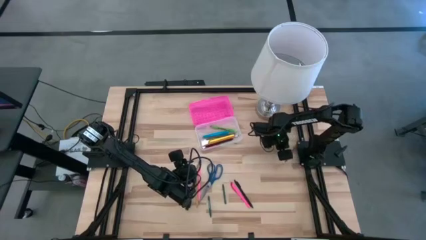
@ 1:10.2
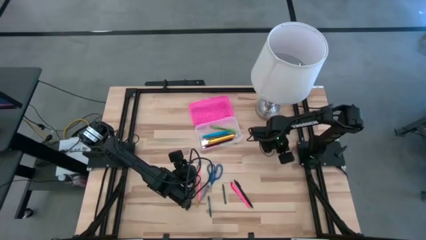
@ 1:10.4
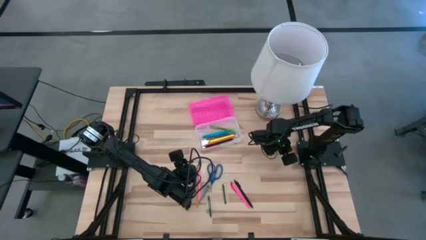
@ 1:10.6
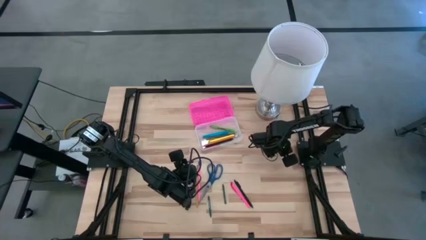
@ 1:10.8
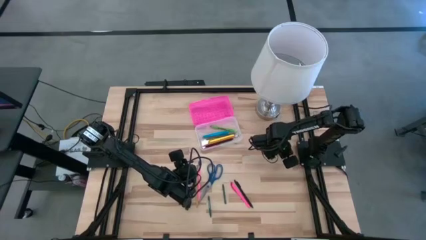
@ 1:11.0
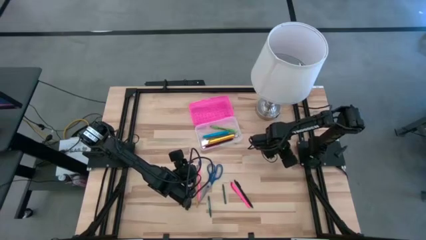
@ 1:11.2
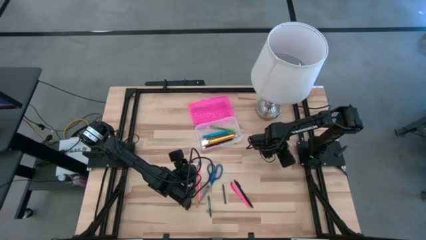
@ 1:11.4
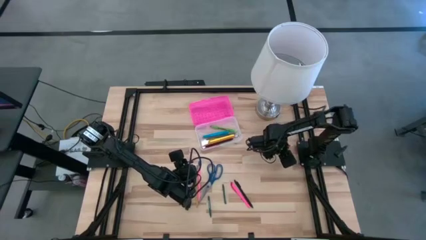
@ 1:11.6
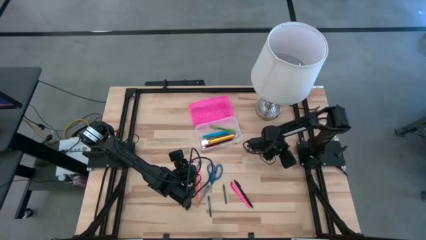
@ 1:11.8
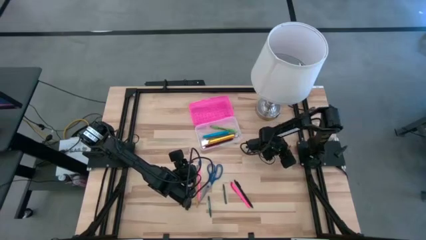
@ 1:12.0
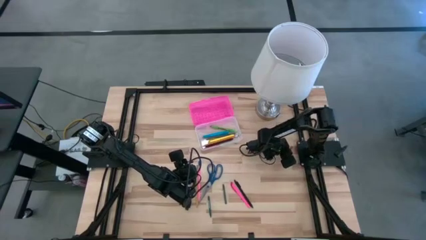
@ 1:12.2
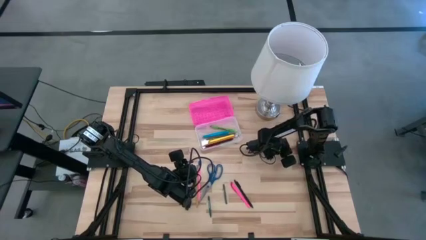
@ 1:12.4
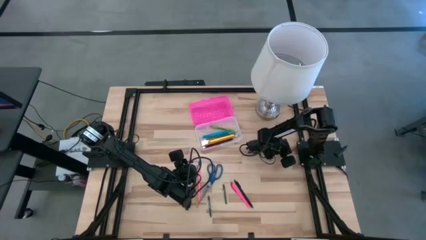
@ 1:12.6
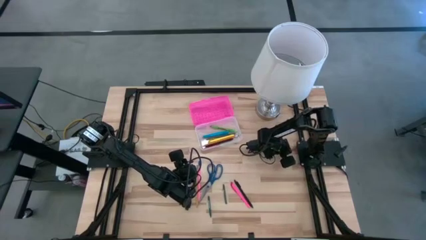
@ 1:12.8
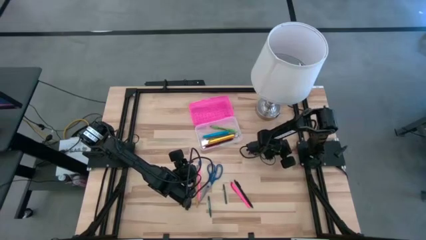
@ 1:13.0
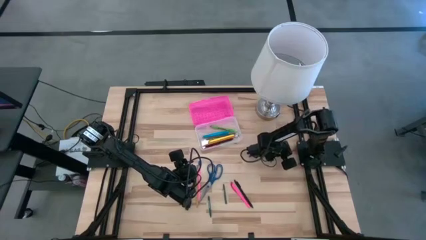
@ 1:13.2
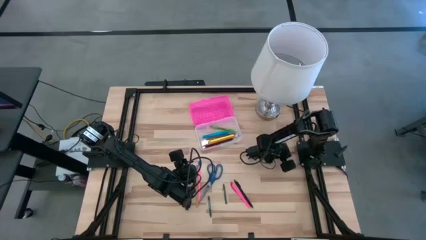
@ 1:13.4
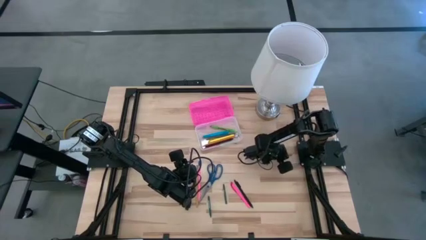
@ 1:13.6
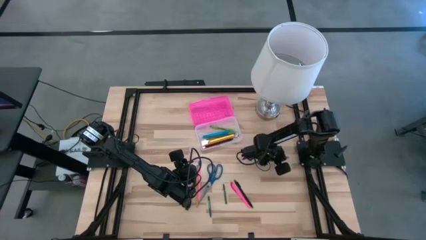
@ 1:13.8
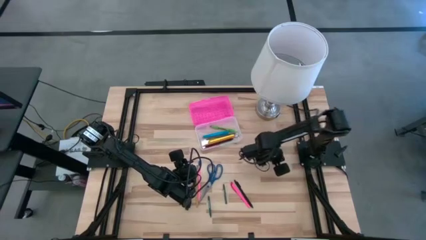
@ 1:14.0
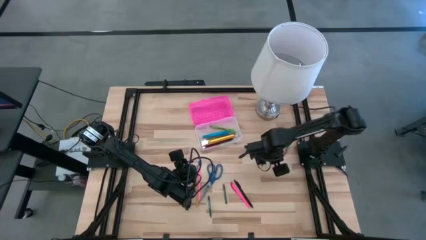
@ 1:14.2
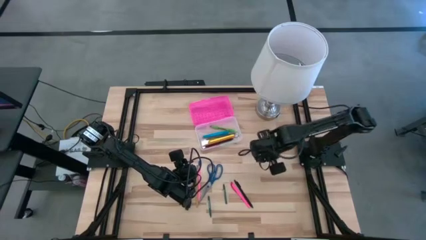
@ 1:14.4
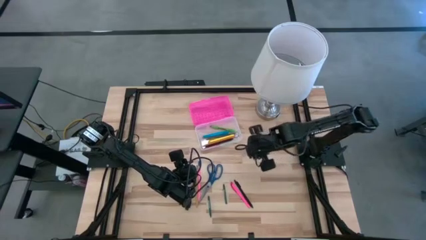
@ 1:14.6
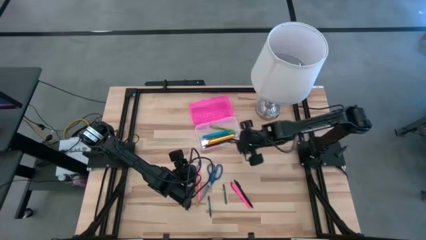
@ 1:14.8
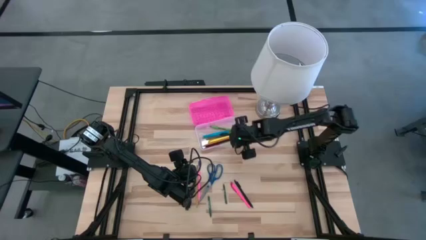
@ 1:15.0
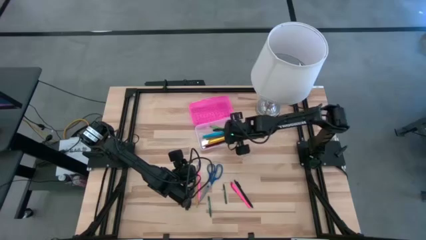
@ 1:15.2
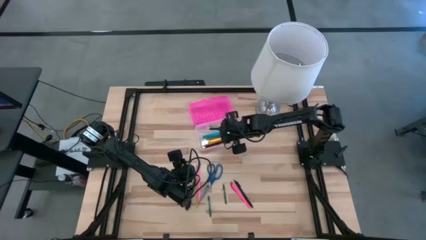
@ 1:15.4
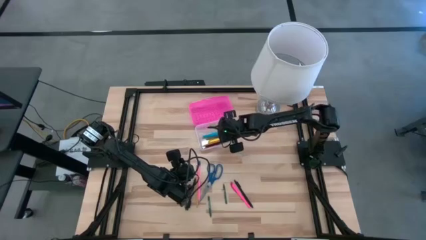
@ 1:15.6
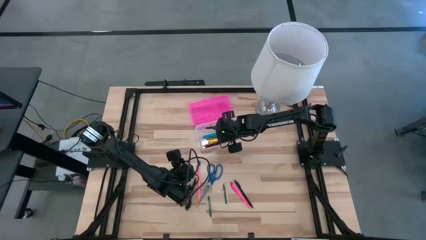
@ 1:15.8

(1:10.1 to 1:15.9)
Task: Pick & place school supplies into a supply box
Put the red crayon into the pink supply box

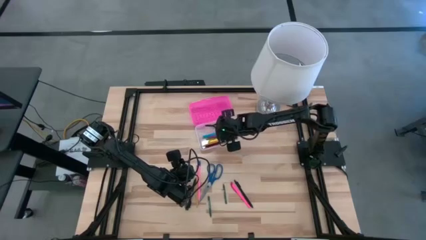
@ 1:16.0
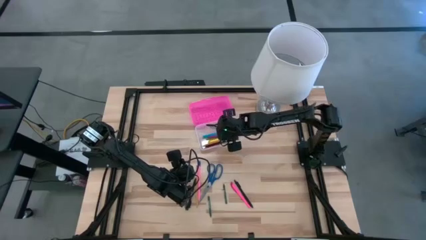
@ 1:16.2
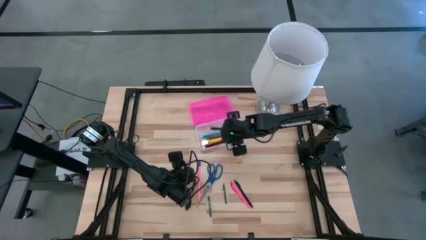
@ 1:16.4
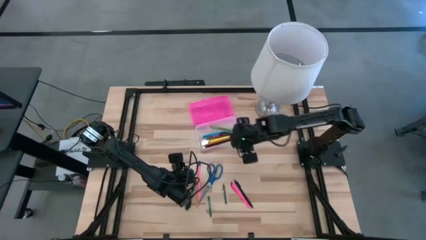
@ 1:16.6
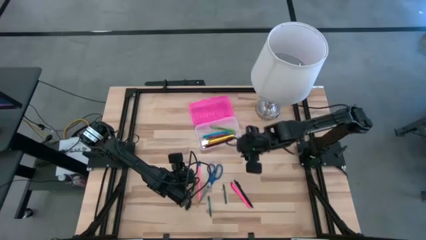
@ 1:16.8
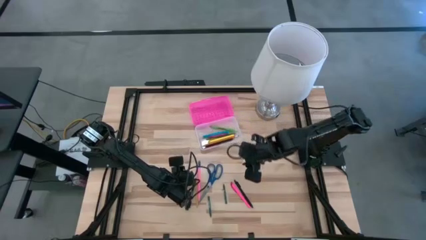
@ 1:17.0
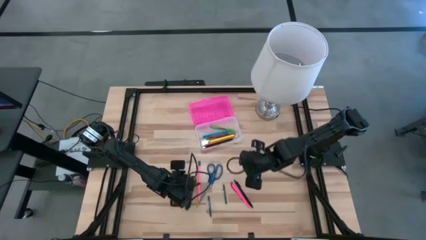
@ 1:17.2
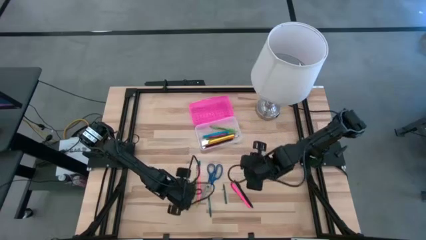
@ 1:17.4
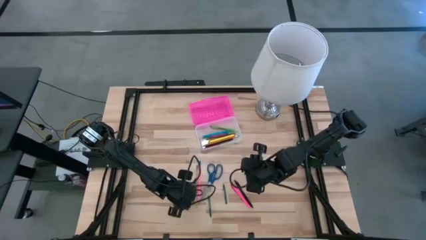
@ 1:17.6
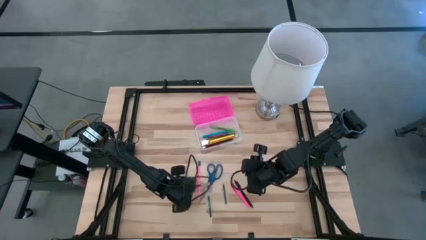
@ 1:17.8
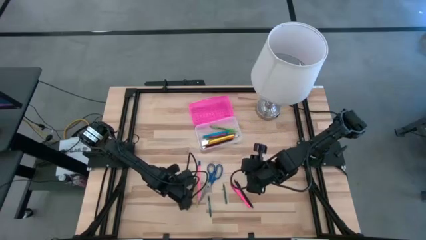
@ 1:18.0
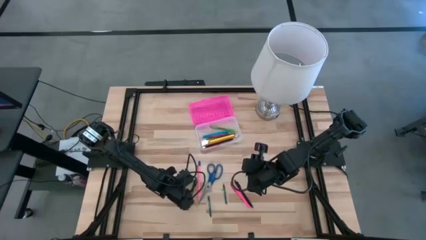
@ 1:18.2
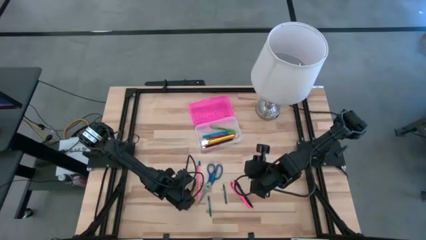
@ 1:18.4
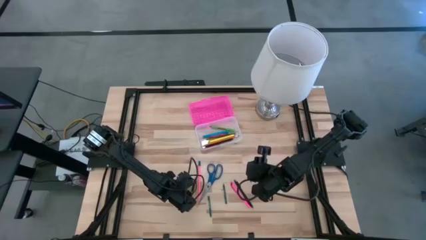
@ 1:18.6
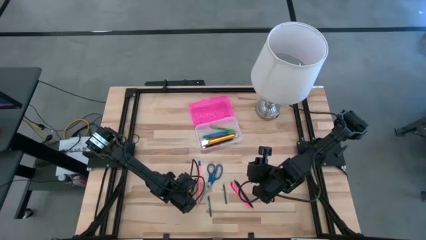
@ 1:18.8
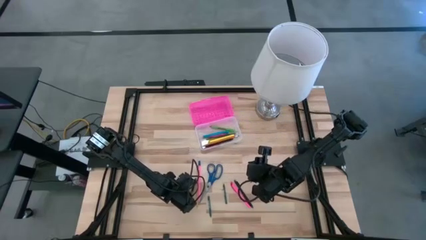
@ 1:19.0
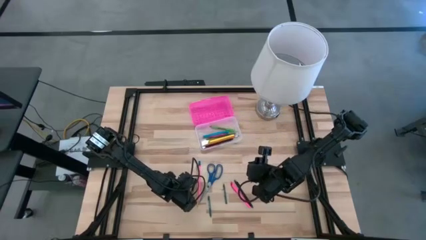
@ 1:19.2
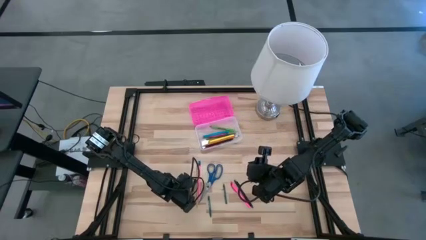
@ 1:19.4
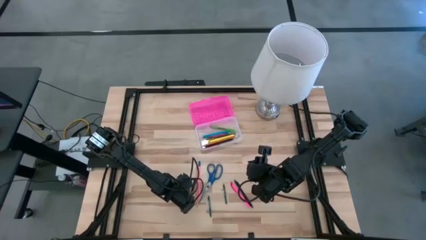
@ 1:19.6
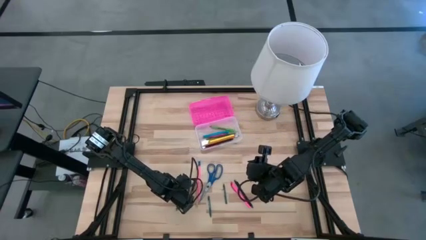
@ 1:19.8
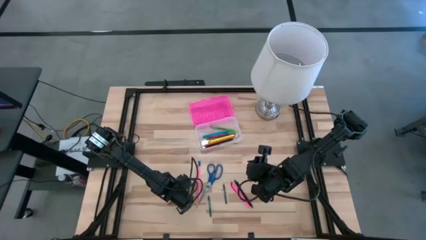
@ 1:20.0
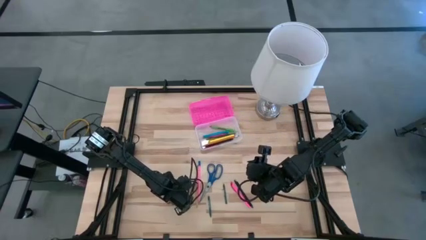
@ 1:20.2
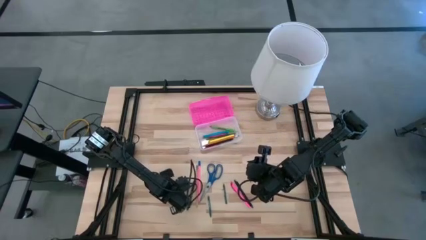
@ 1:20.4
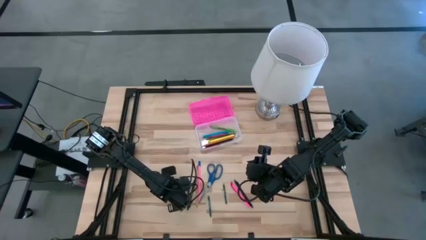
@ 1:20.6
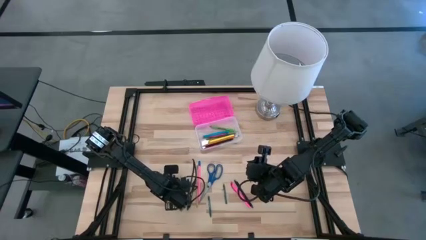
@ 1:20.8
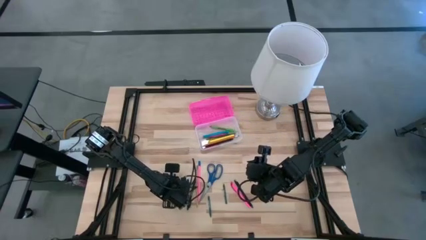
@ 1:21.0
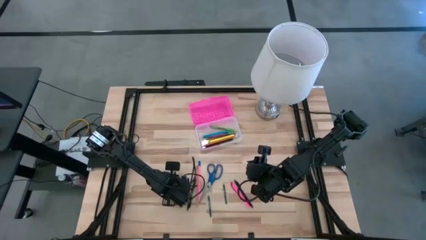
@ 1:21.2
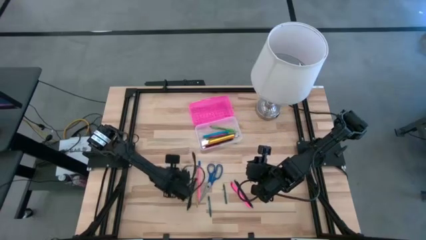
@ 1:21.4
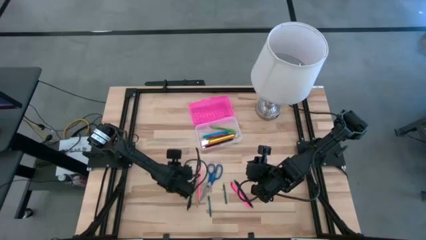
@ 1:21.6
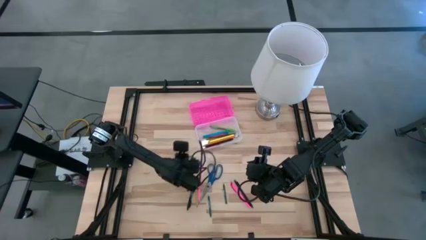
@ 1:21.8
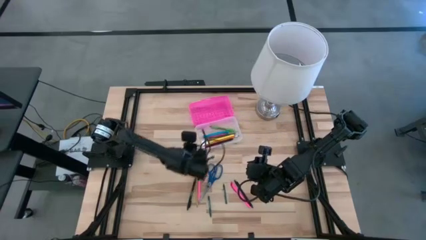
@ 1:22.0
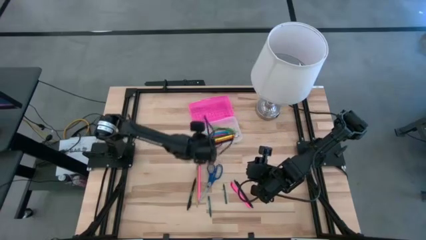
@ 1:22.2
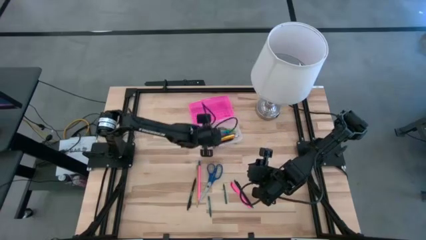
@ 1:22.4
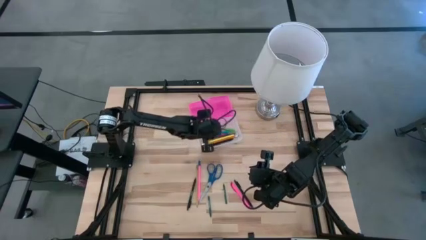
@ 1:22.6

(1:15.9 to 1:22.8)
Put the left green crayon into the pink supply box

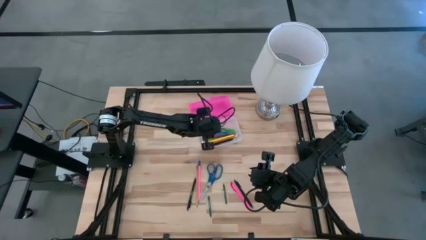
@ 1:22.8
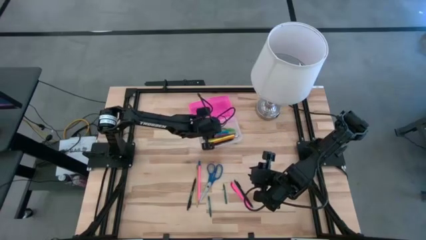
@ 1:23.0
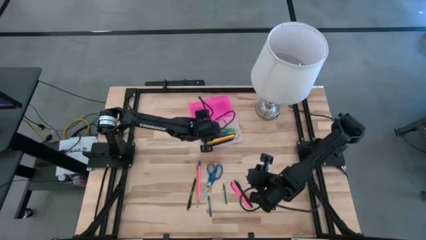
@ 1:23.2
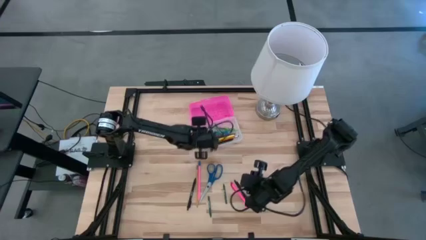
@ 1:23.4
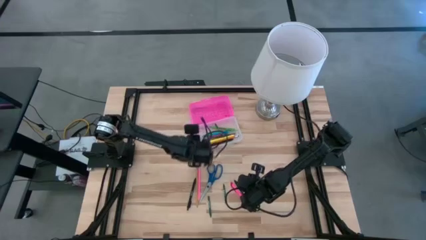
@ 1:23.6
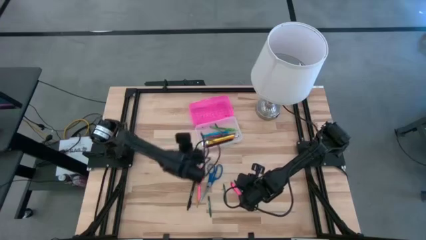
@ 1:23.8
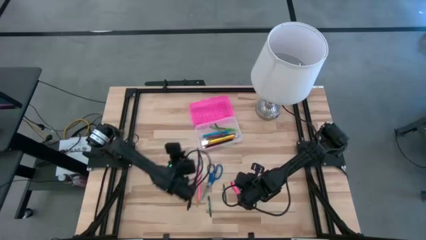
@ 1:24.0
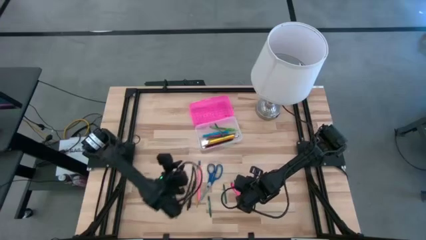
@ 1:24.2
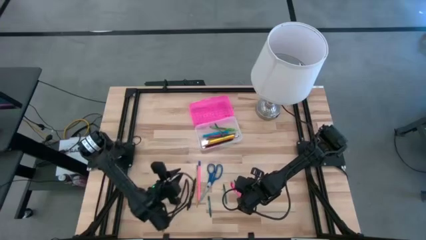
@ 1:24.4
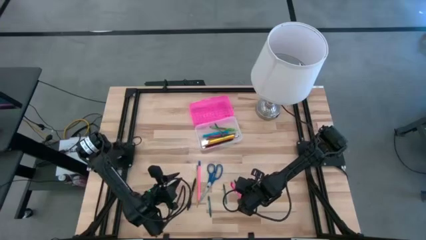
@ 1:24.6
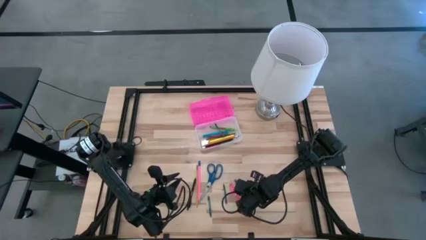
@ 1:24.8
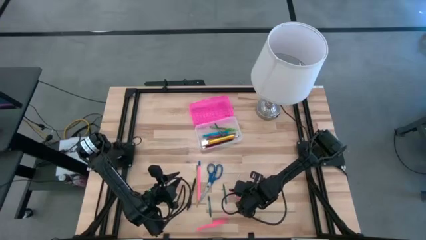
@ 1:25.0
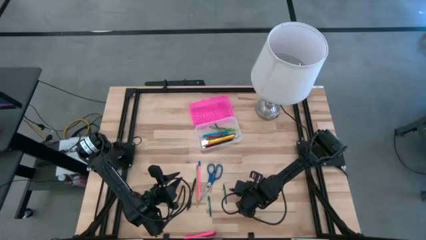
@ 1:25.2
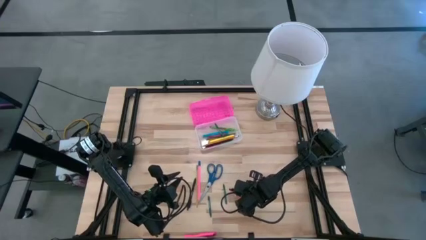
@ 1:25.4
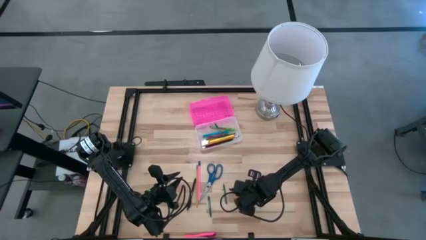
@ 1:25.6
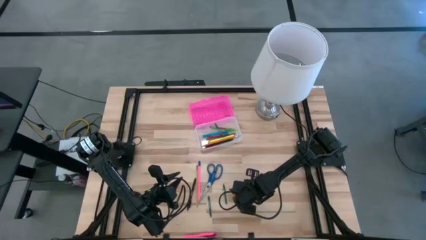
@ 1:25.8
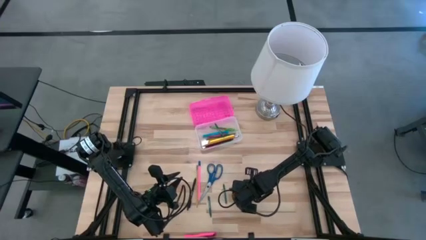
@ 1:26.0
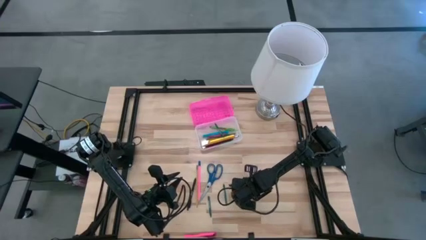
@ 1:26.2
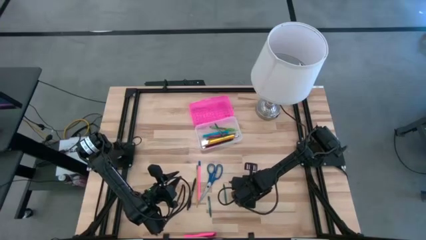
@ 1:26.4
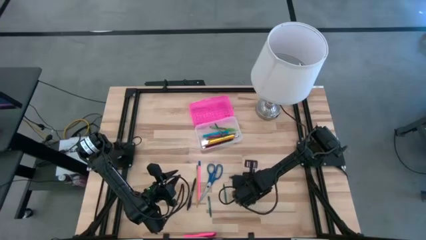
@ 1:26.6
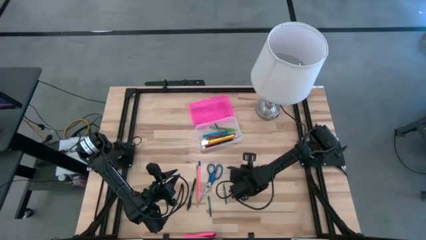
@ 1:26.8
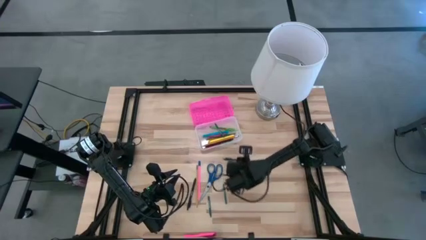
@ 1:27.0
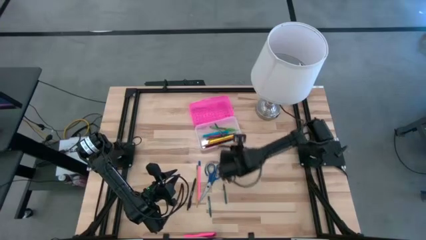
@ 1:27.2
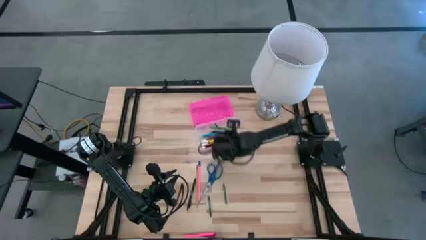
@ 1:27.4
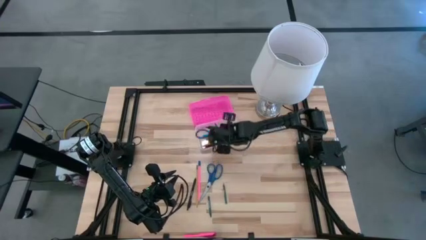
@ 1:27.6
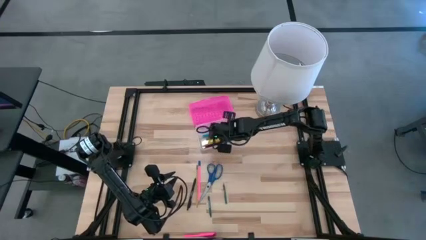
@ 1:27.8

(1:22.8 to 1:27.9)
Put the black pen into the pink supply box
